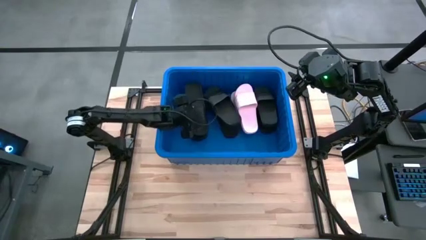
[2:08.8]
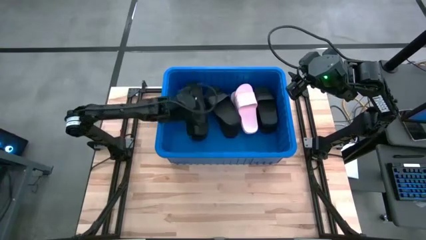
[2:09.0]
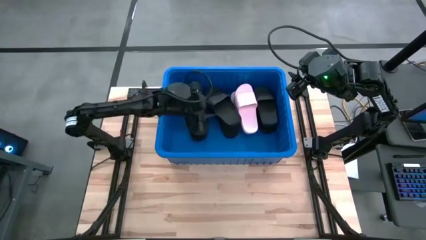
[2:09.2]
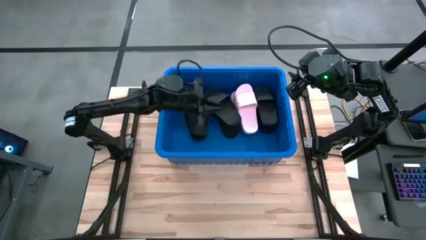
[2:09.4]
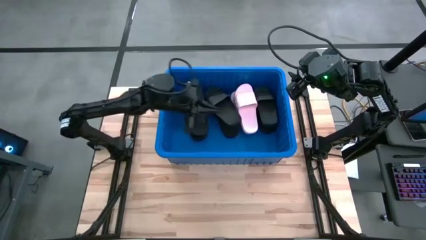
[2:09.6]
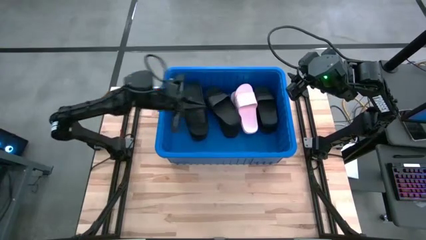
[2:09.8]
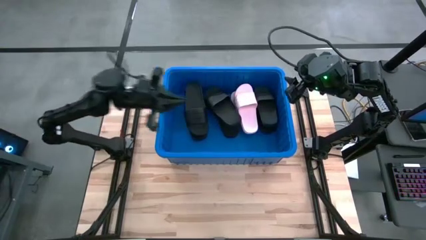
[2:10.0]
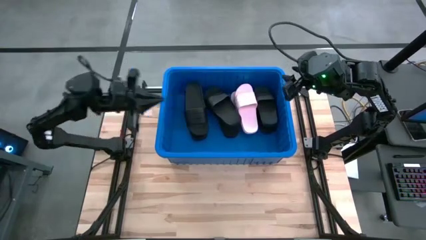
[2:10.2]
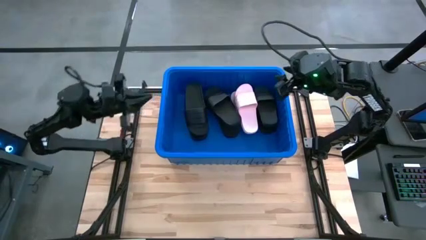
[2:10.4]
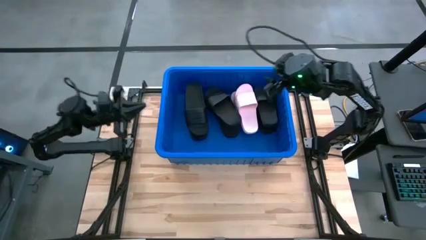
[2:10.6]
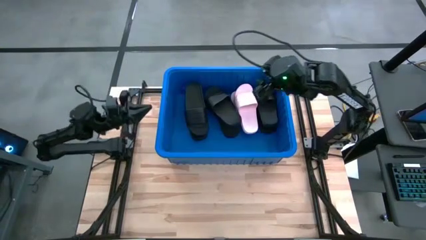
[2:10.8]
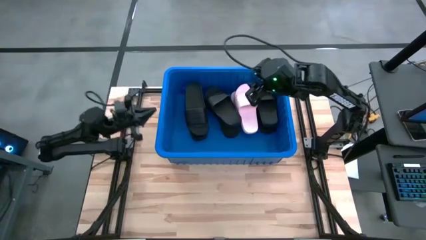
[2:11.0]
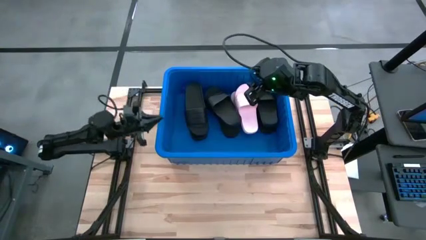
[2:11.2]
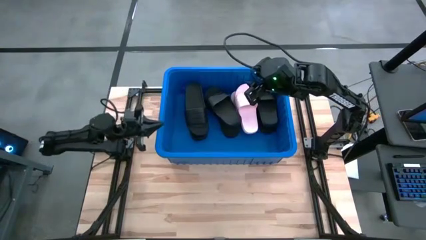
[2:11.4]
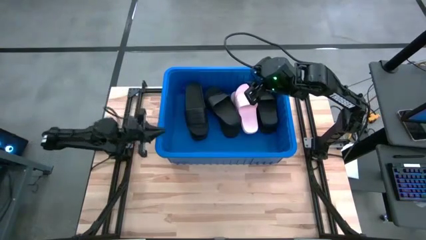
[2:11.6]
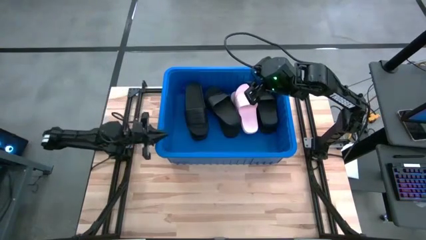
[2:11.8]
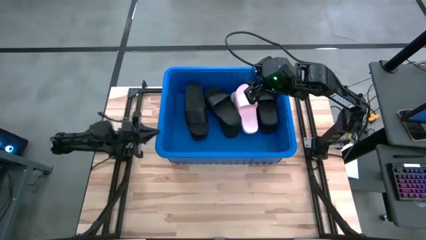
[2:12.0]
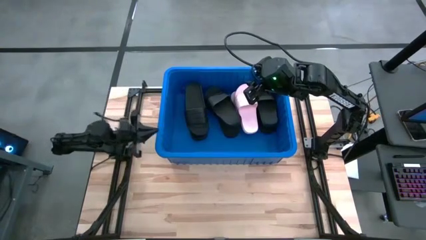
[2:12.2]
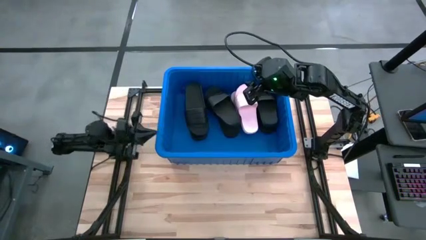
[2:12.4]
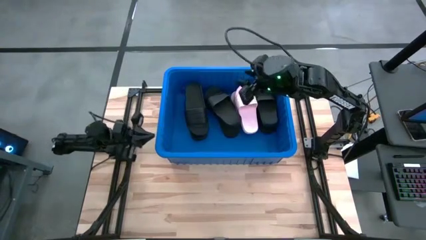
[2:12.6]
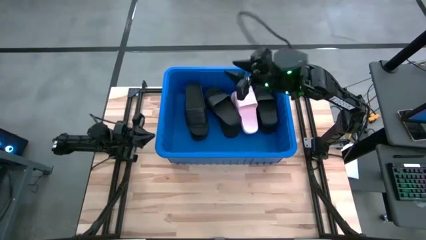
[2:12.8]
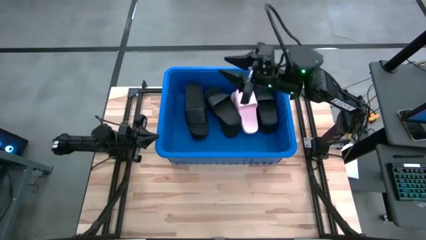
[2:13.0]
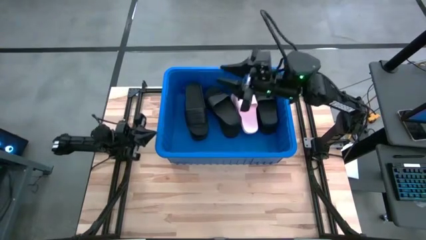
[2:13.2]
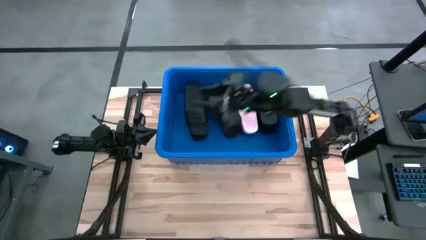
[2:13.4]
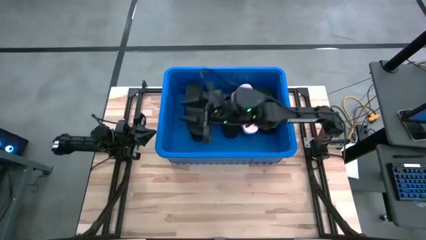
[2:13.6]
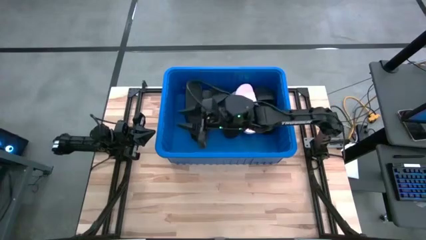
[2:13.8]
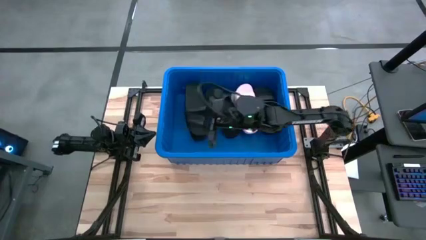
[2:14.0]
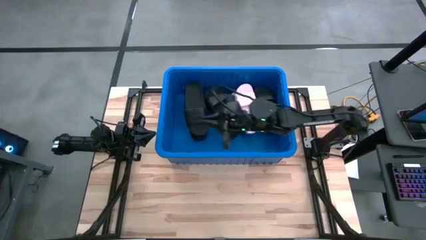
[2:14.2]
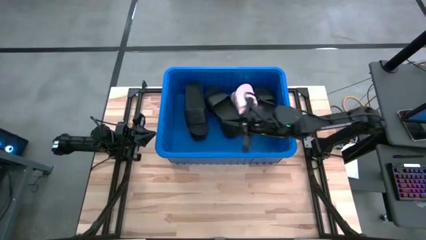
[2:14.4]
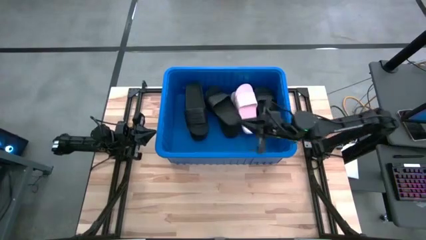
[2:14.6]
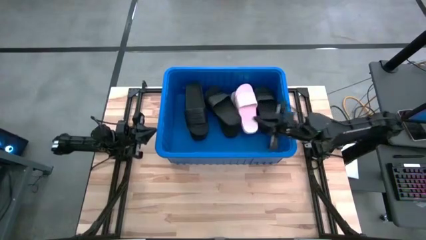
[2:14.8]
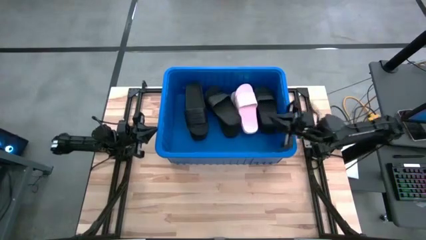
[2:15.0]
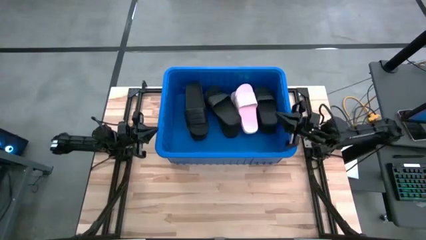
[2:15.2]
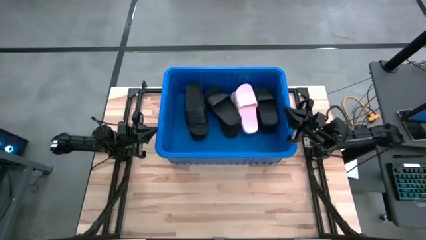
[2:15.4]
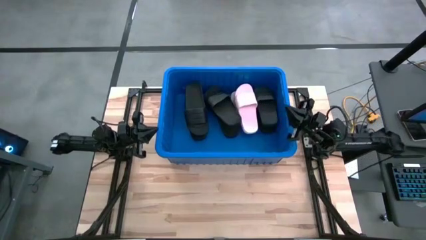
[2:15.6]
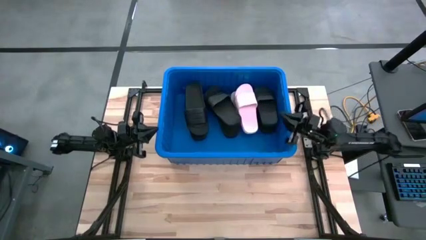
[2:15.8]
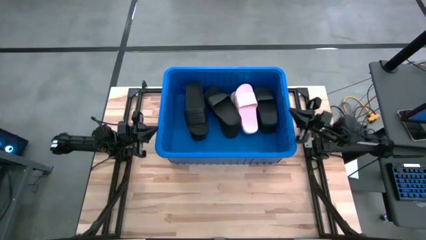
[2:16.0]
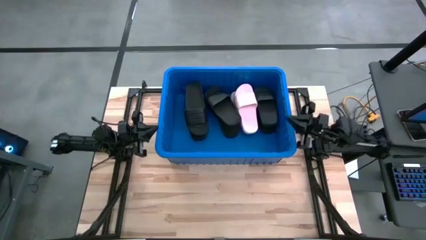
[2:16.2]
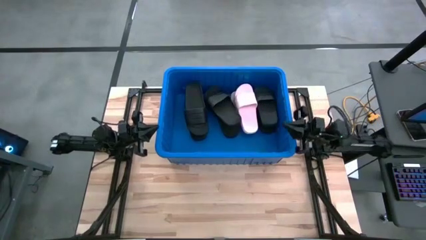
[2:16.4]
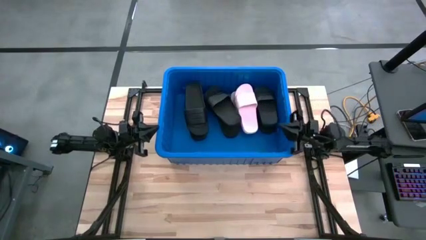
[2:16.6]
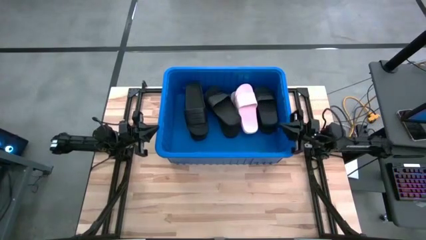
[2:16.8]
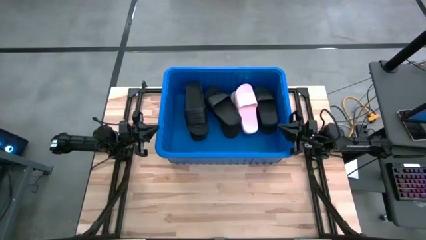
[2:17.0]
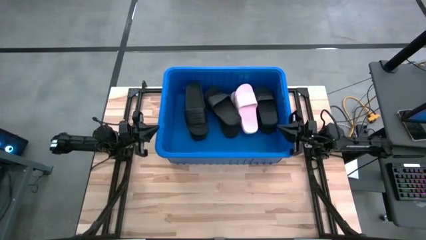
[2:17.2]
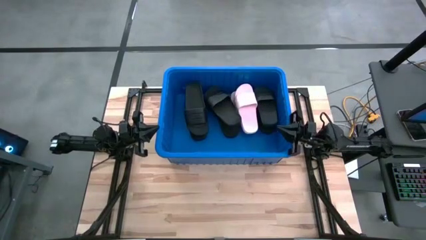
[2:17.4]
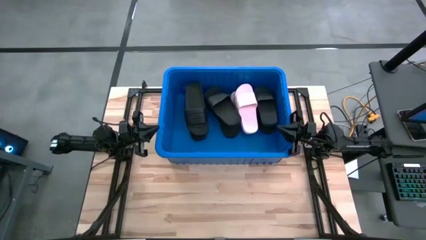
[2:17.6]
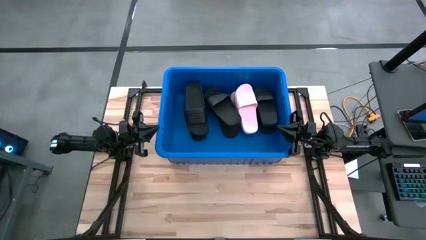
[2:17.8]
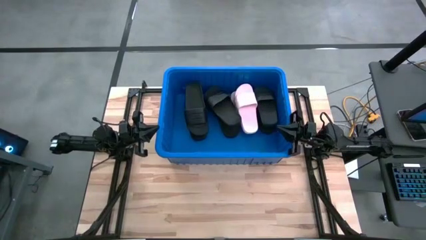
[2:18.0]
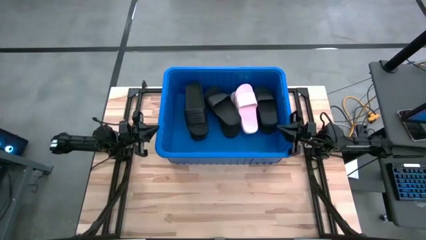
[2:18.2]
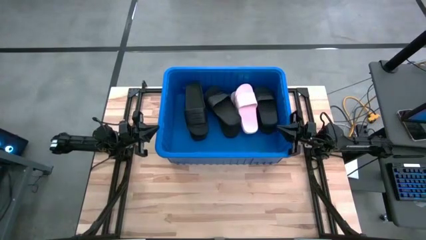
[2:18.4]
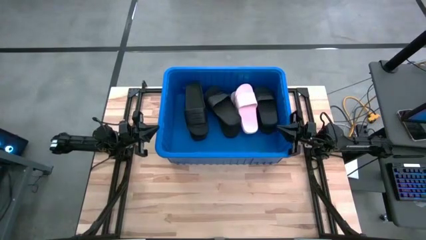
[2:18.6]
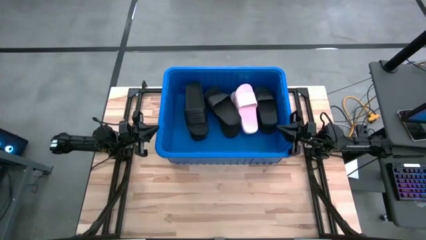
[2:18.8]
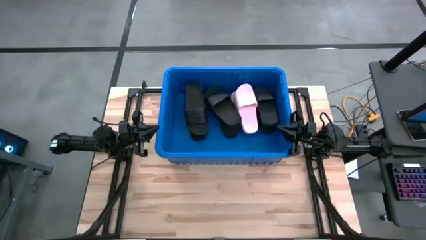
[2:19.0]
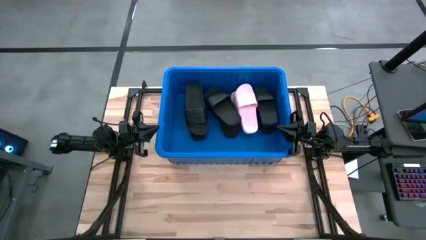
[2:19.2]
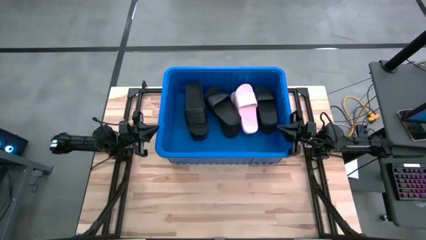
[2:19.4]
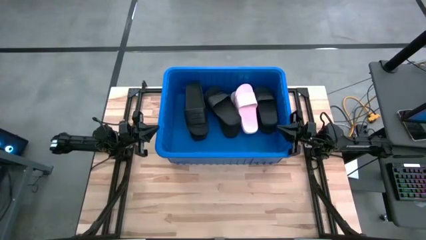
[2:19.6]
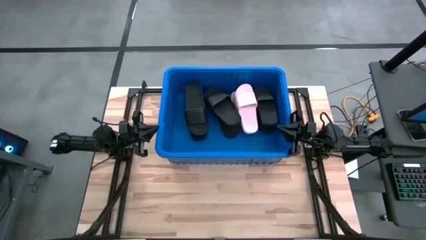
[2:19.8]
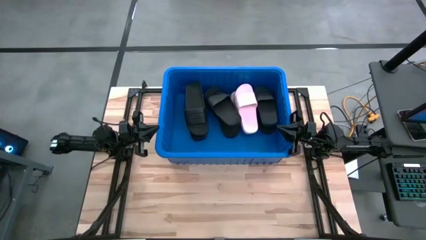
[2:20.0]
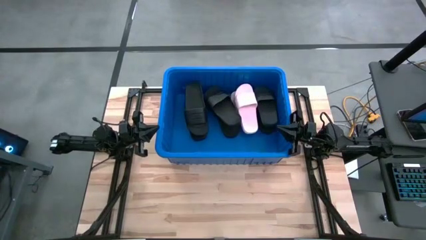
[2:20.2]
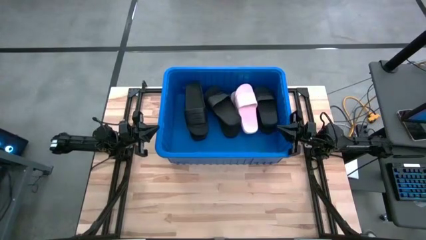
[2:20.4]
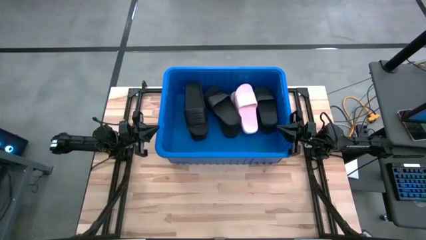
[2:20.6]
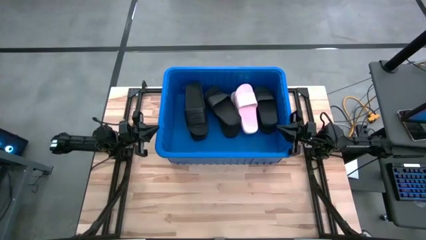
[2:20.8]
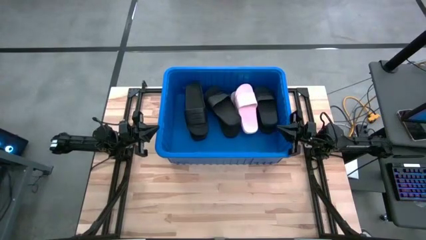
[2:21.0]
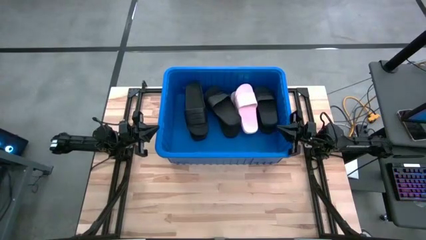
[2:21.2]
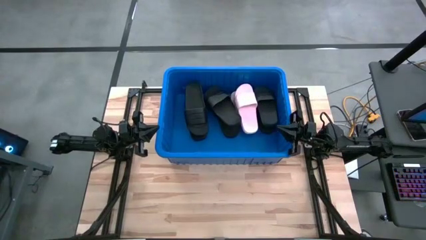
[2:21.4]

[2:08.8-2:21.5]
Task: Pick and place slides into bin
Return to Home Position
